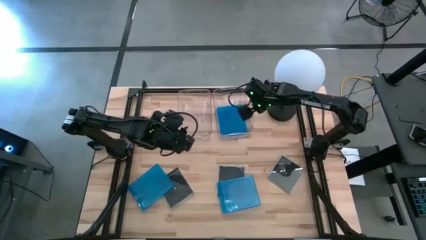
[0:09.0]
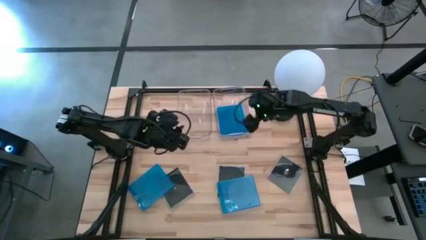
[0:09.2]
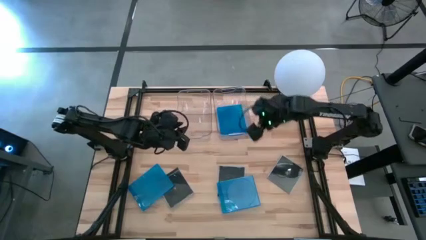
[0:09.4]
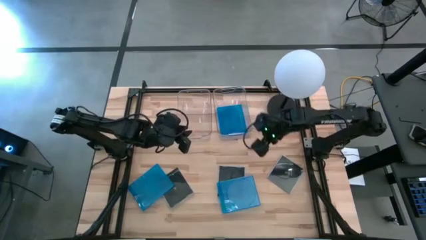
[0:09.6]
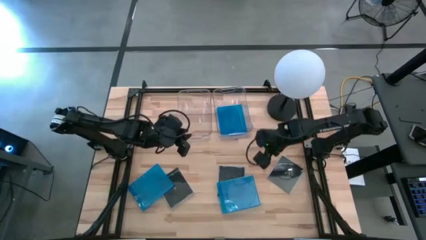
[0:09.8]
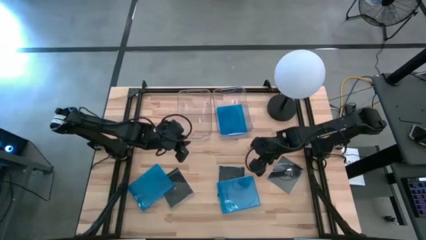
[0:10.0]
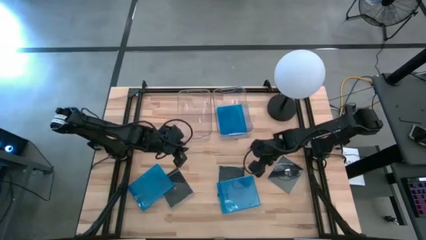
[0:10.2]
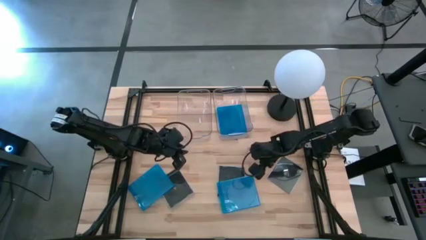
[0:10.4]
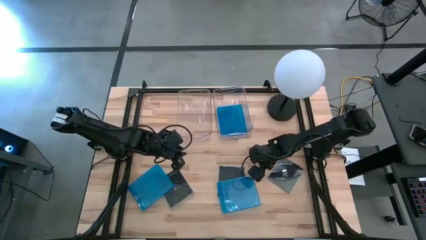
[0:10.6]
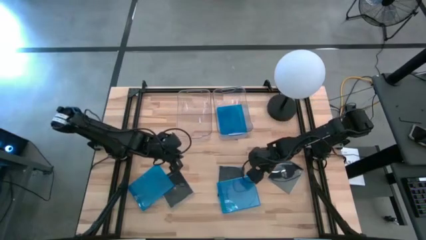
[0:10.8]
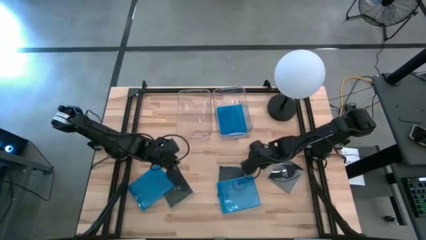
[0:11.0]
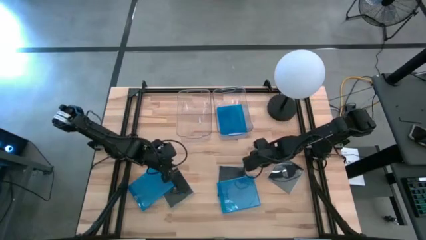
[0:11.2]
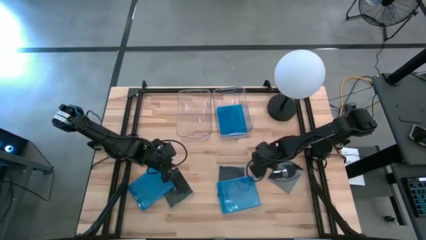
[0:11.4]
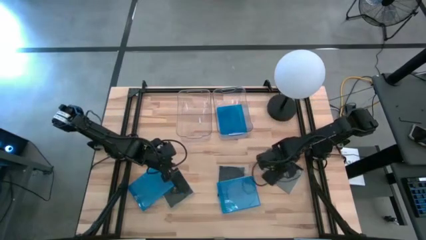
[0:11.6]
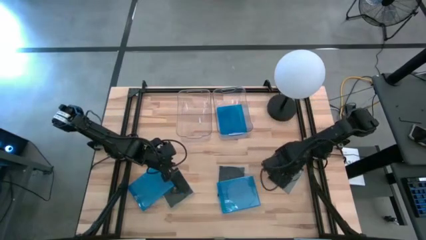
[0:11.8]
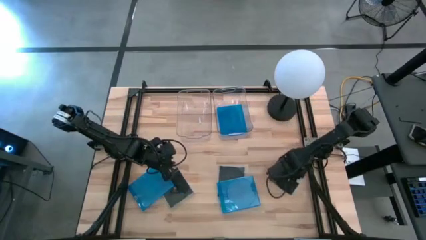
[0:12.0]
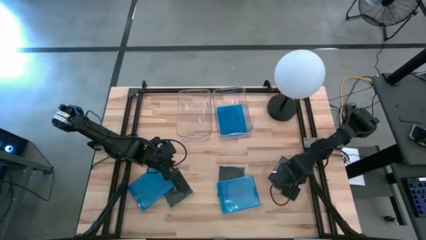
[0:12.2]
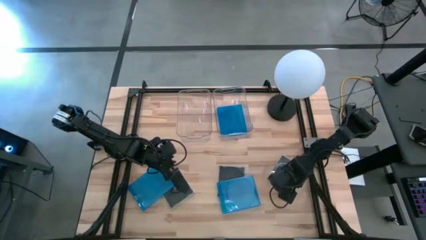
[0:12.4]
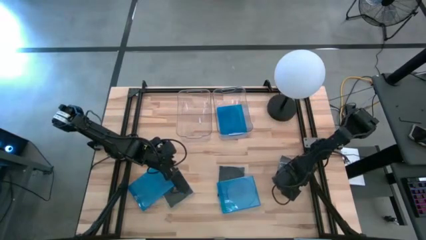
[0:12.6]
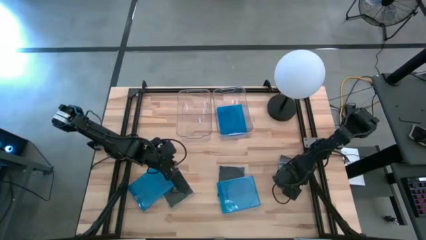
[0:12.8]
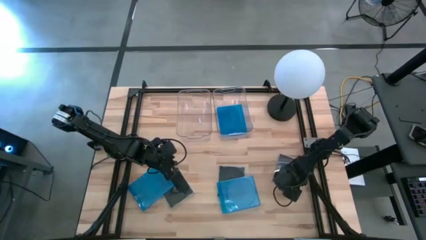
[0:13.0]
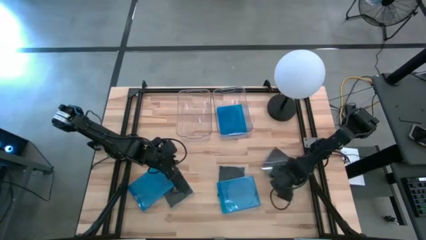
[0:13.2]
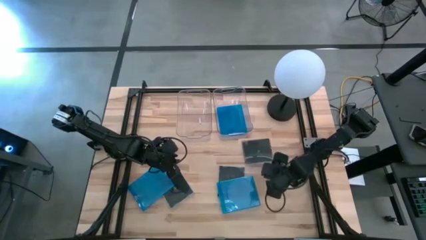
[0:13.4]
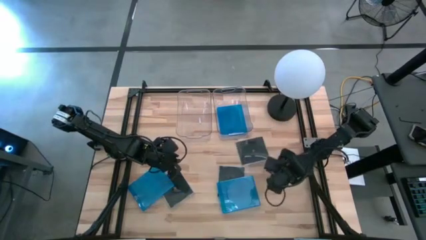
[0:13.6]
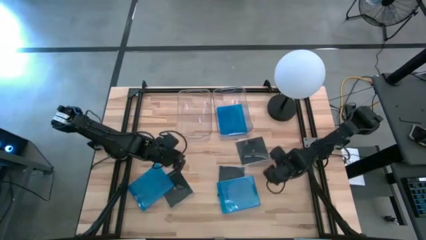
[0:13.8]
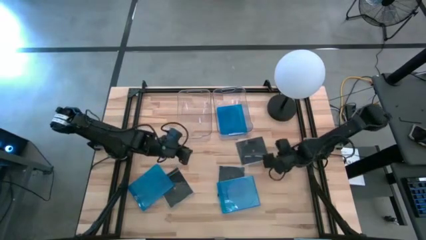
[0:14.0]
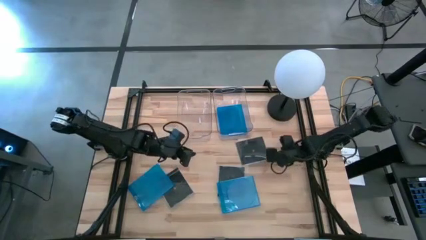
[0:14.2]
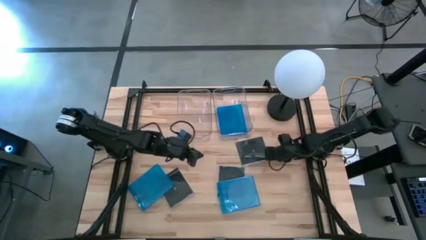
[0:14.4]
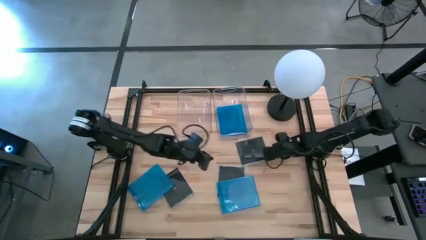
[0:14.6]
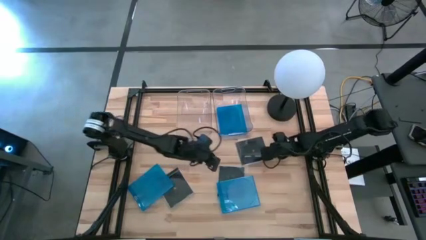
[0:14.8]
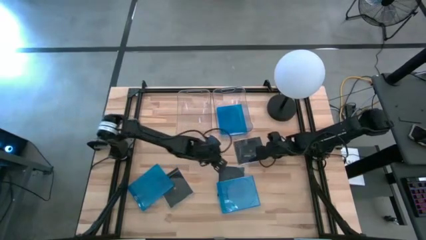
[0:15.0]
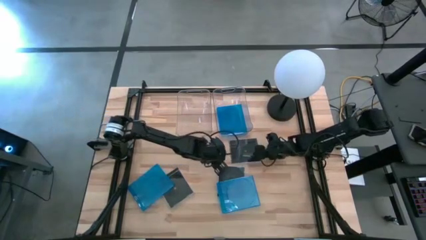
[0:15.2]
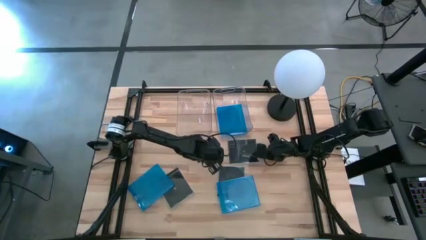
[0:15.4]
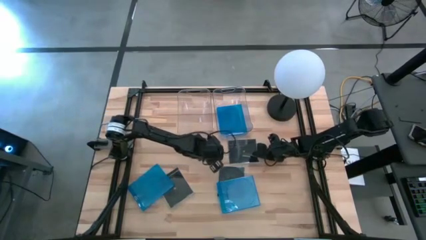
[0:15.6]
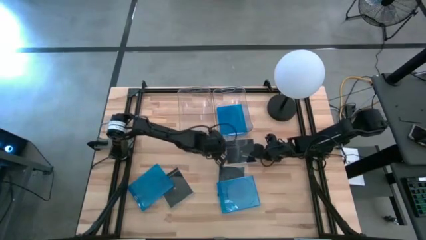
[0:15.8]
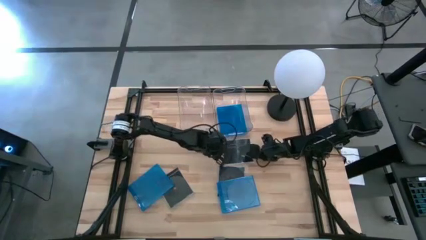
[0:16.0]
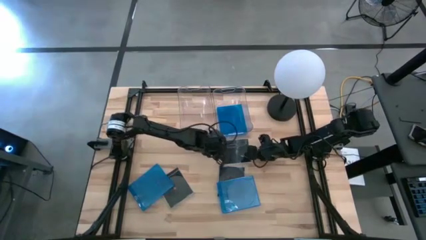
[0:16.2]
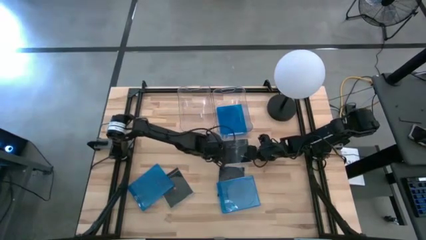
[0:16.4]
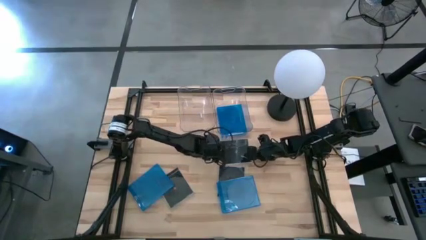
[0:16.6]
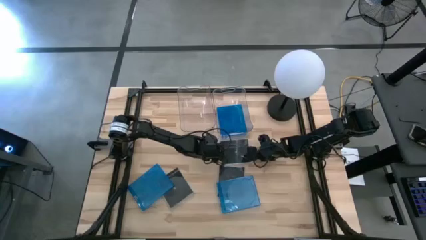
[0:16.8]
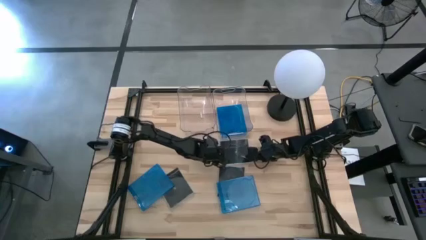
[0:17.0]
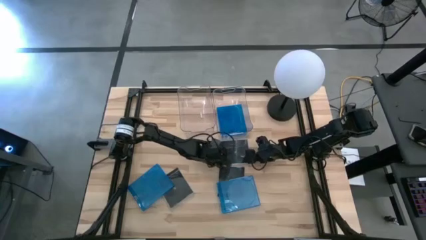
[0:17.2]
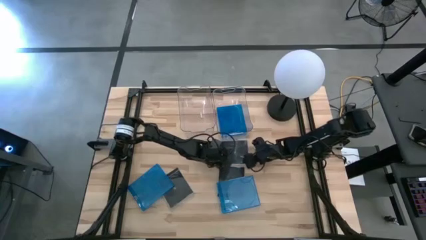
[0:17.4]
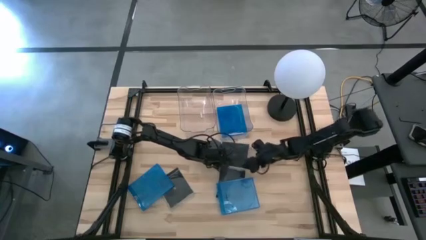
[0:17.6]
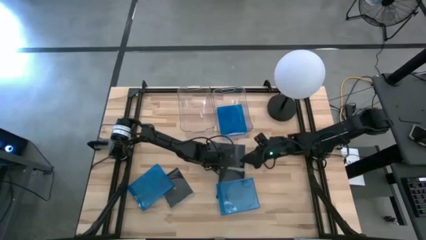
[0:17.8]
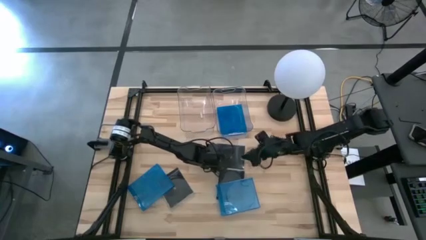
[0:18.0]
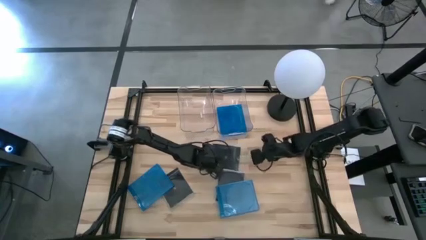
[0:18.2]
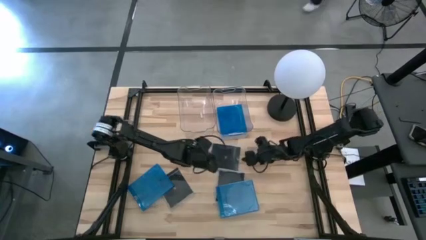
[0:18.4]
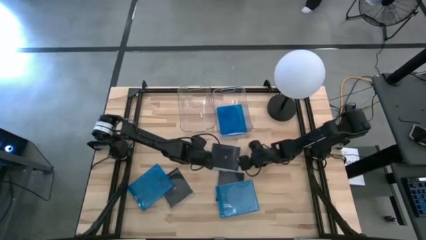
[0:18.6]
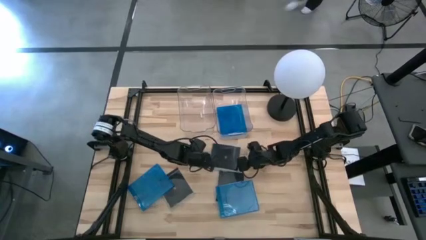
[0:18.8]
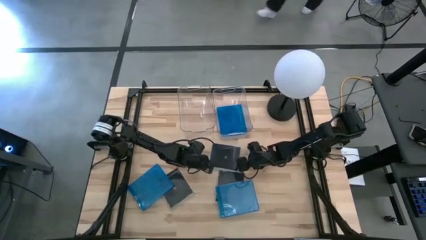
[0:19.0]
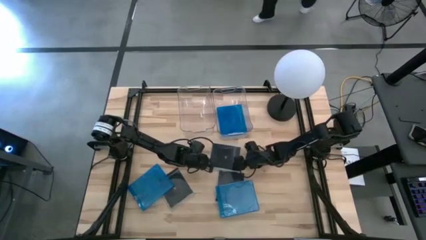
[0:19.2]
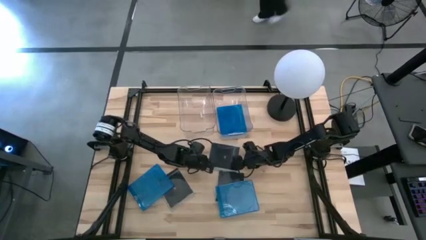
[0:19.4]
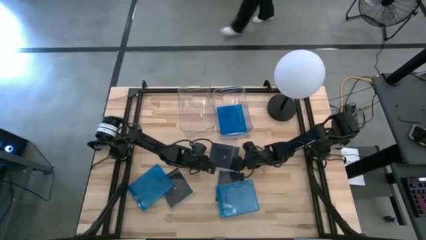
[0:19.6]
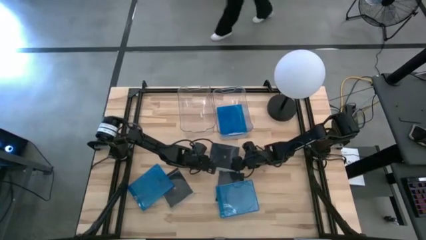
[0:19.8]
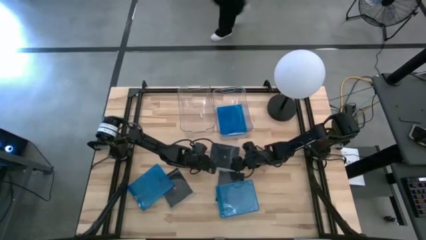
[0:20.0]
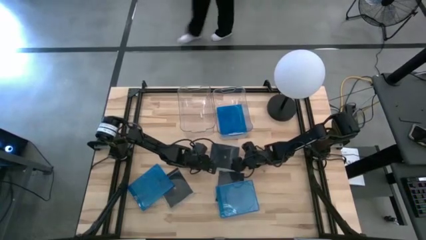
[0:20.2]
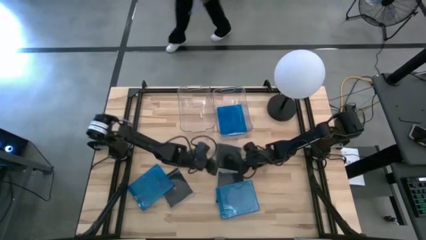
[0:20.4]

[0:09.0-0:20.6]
Task: Pick & place jewel cases by type
Put the right black CD case into the left transparent bin
